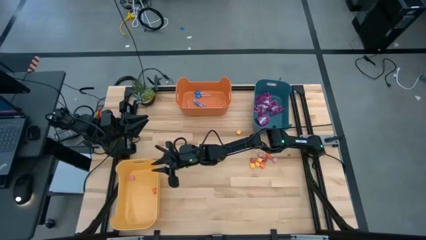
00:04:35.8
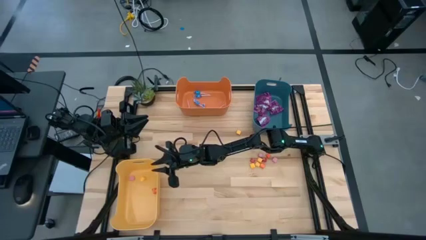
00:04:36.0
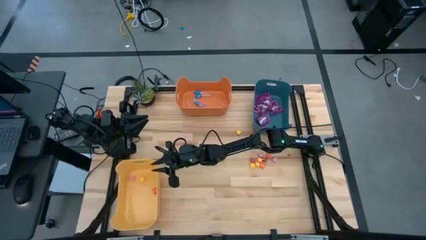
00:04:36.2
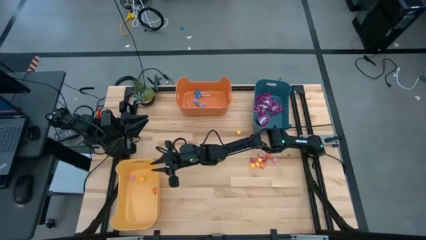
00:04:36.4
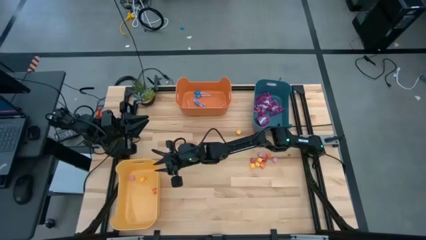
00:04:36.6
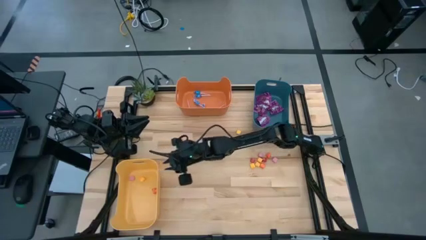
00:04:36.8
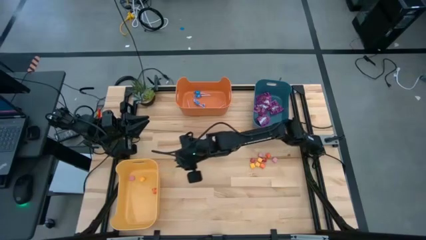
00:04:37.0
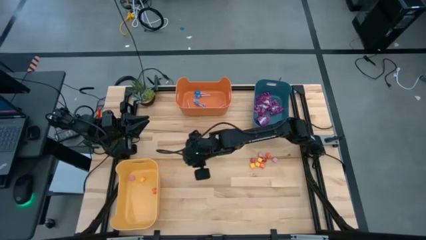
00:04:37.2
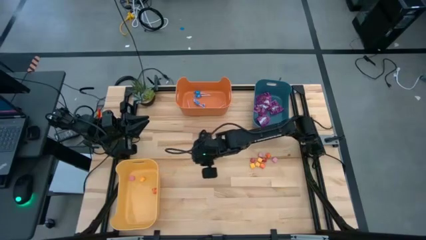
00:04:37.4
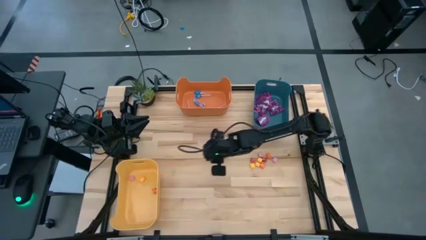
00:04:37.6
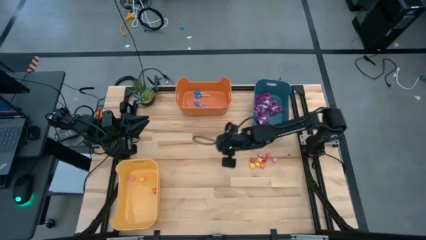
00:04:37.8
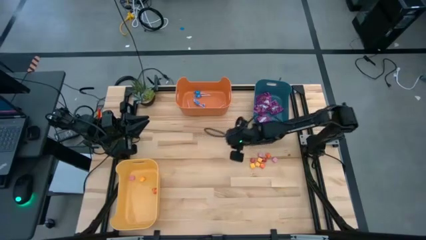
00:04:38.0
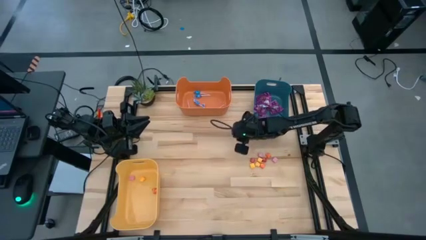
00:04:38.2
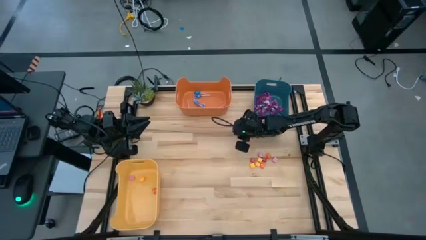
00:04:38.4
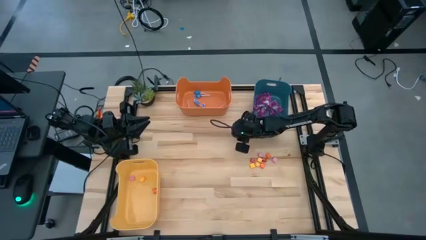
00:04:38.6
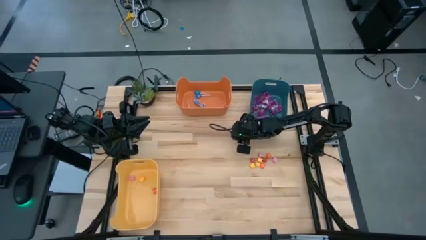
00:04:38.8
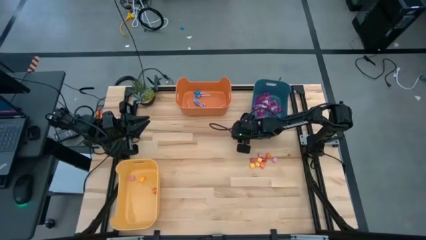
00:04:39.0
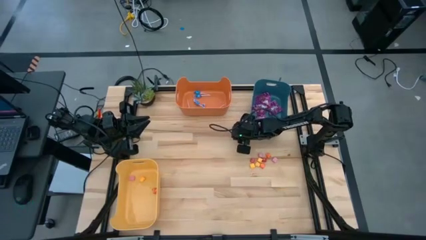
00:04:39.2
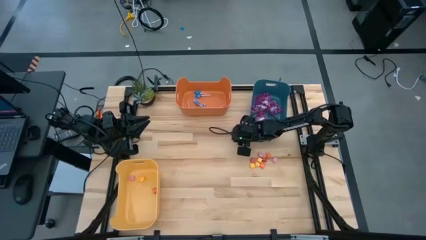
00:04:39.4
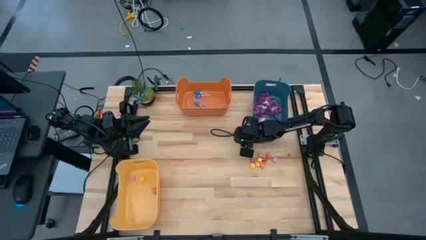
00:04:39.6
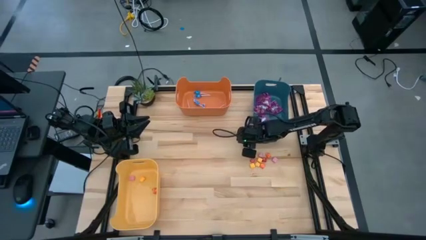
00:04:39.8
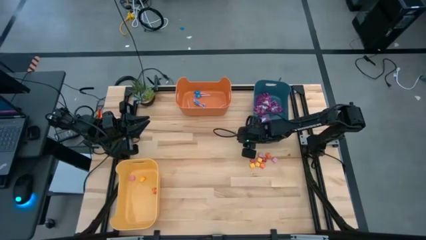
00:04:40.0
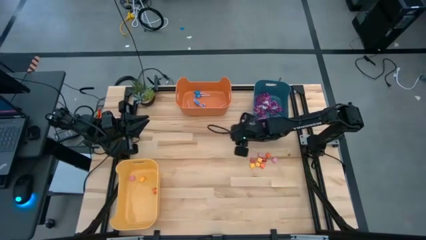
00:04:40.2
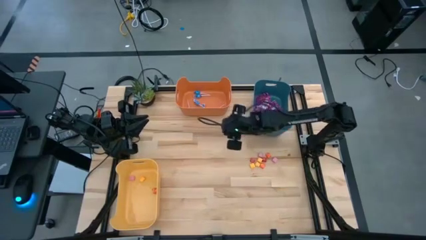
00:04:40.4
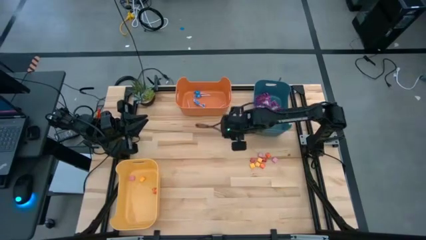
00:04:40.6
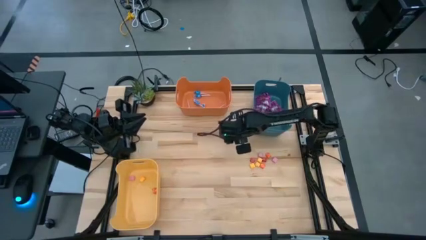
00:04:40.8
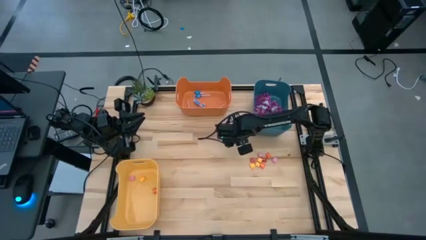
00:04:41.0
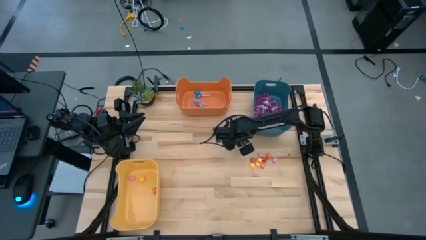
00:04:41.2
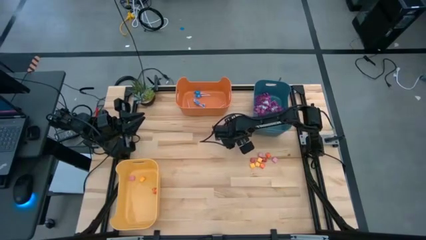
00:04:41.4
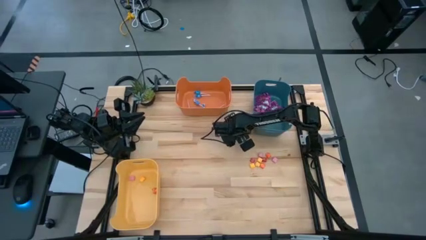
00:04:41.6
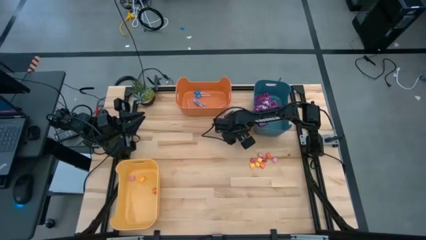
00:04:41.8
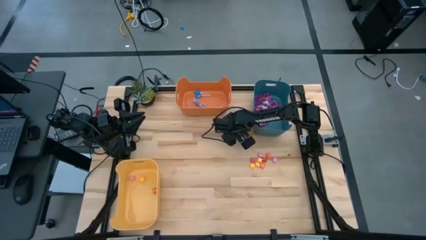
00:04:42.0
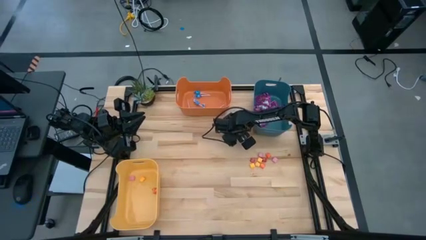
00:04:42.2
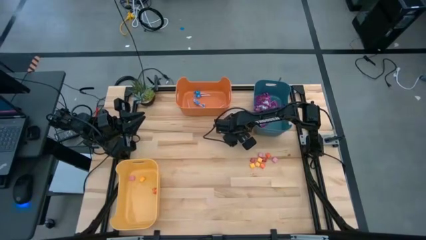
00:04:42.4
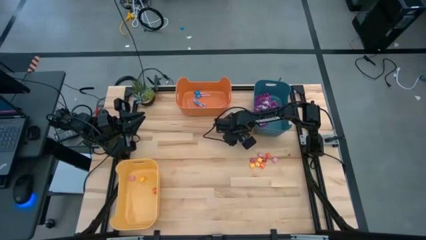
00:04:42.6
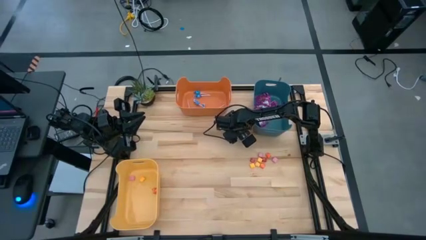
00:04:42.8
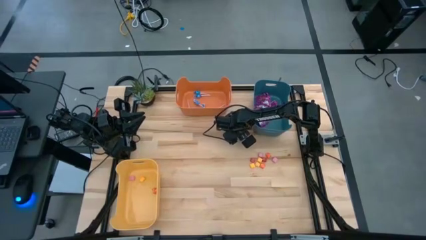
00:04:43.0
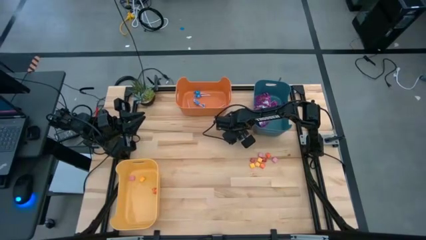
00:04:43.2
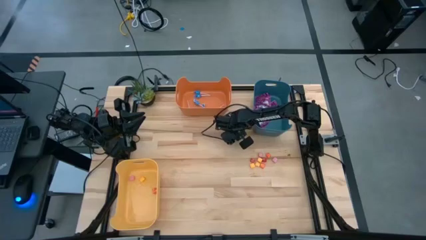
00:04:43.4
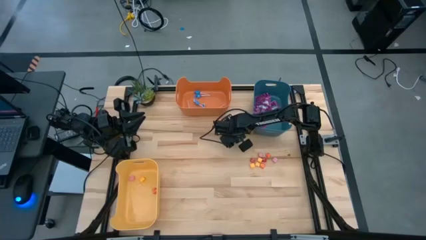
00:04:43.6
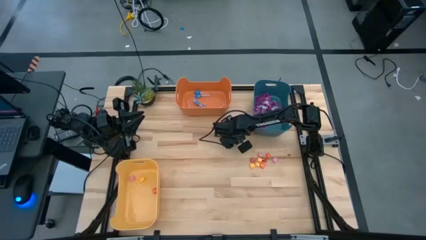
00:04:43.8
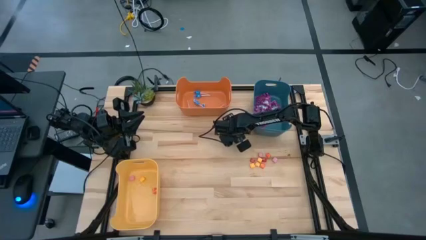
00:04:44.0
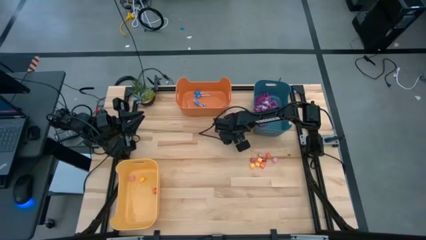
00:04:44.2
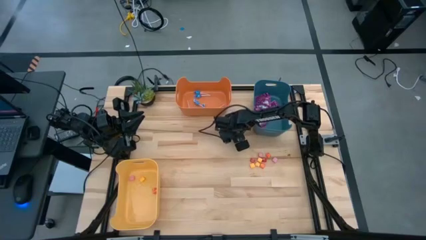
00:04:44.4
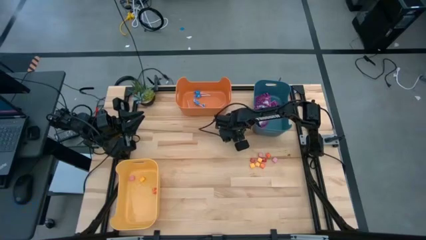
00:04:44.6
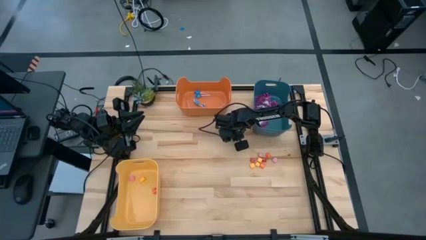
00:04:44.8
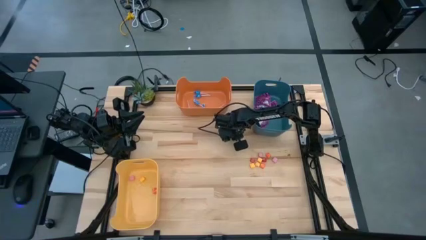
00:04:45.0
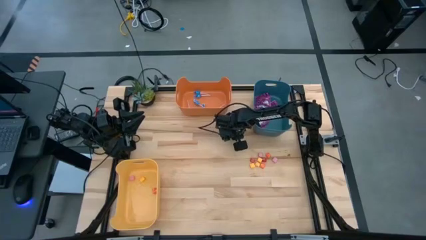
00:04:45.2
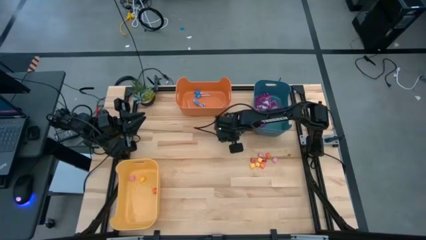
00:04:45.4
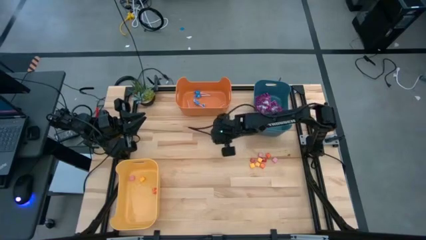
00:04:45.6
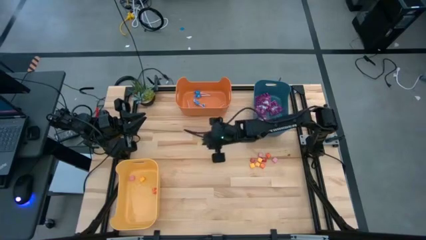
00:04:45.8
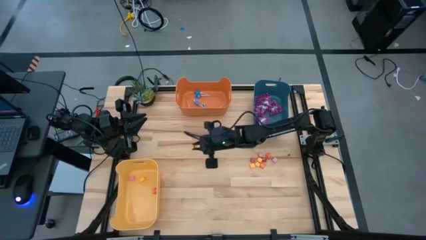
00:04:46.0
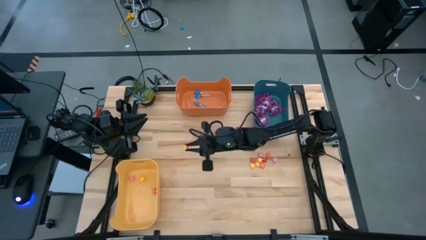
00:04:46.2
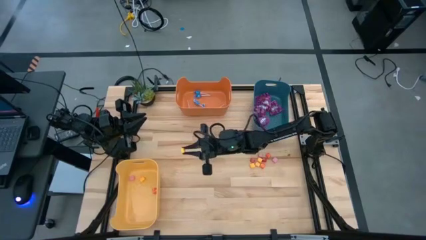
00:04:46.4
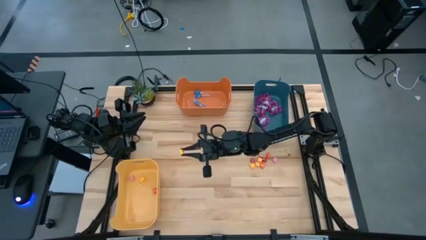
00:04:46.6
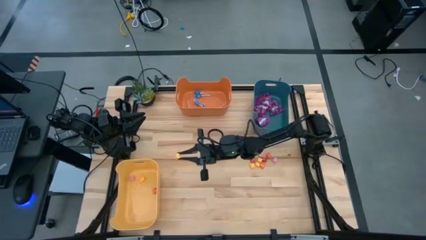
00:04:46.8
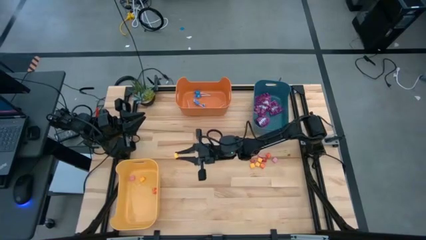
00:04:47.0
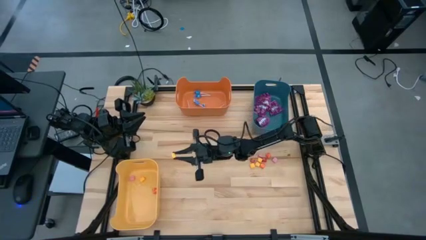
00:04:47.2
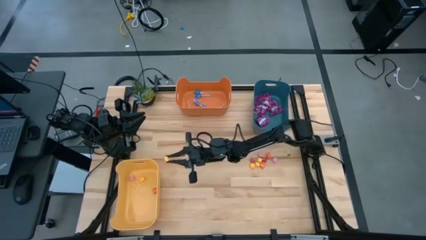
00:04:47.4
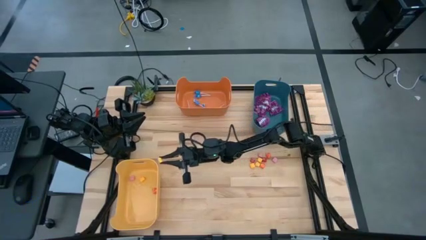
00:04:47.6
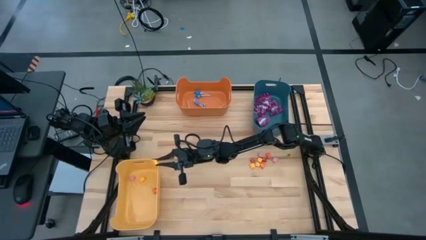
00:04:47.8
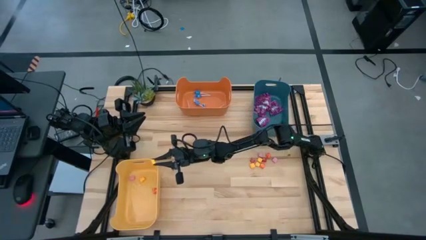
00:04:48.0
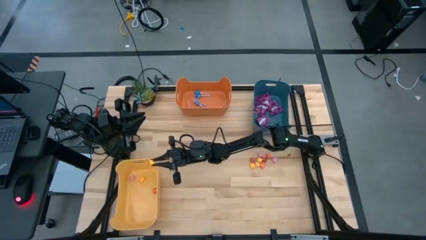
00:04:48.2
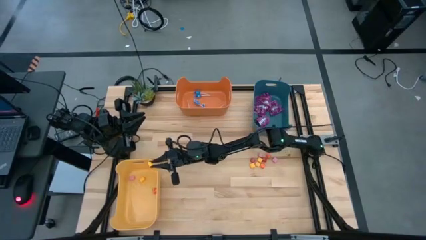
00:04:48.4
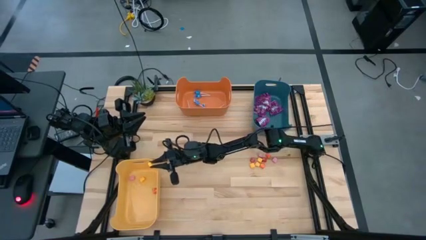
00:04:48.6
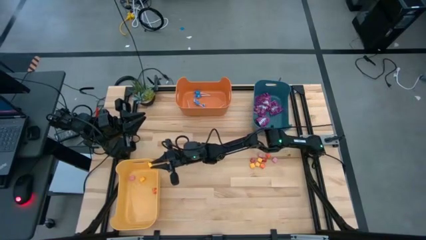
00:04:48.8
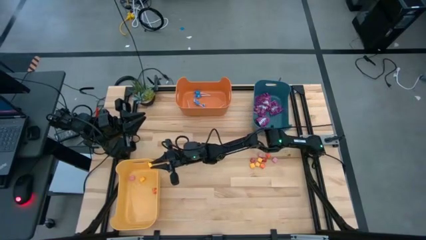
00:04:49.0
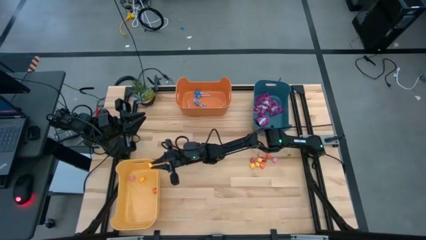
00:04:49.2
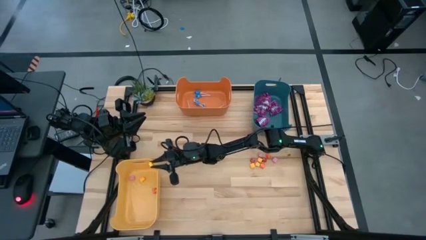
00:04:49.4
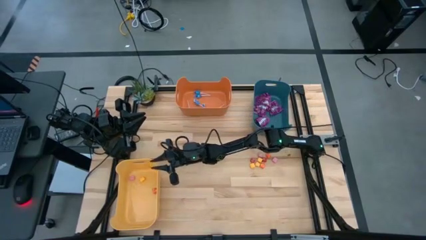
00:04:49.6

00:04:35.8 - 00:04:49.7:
Task: Sort candy
Put the yellow candy into the yellow bin
